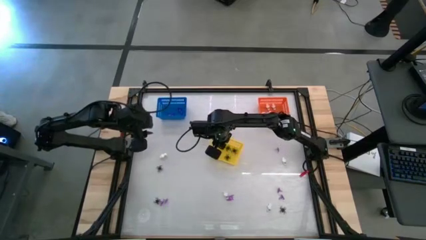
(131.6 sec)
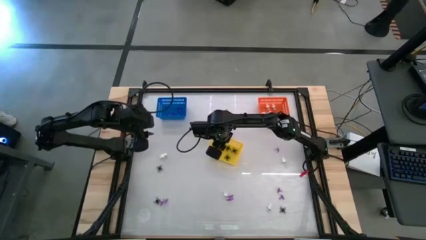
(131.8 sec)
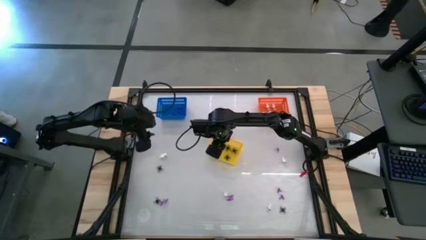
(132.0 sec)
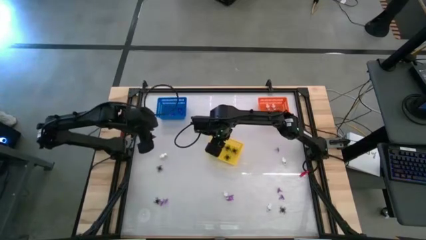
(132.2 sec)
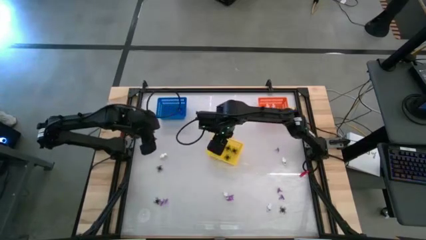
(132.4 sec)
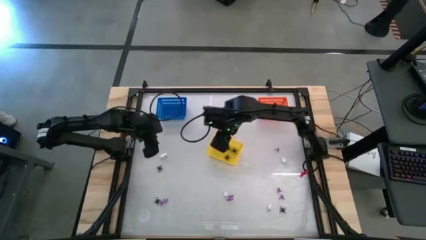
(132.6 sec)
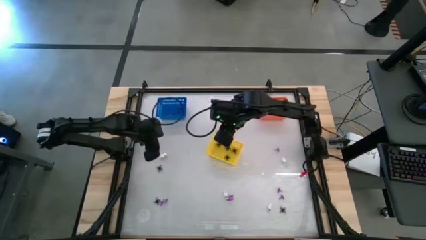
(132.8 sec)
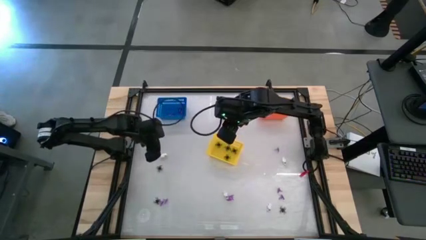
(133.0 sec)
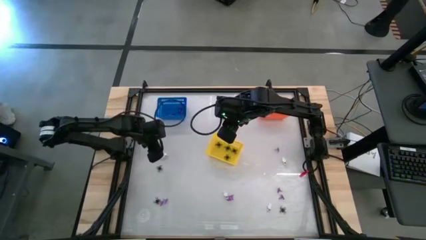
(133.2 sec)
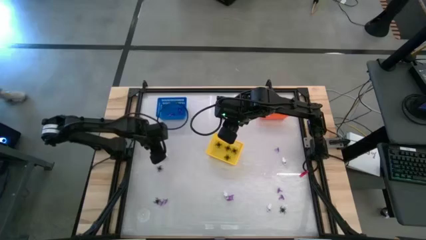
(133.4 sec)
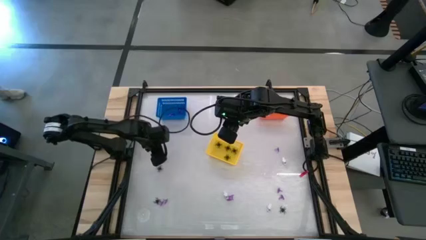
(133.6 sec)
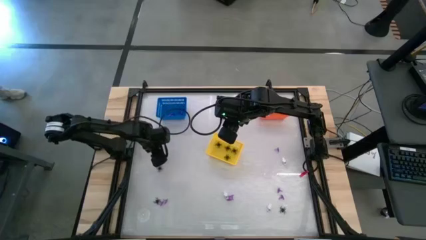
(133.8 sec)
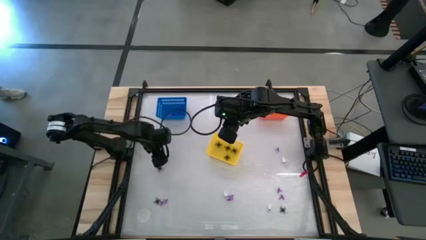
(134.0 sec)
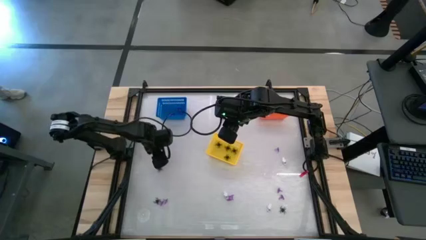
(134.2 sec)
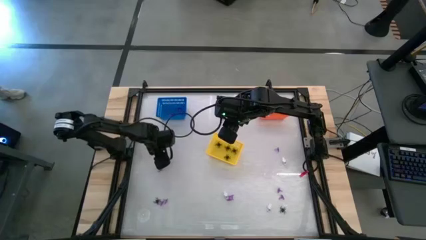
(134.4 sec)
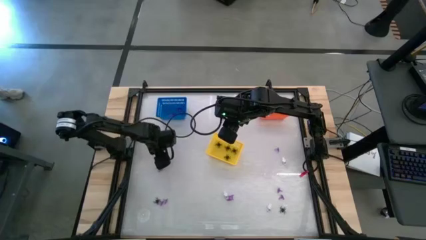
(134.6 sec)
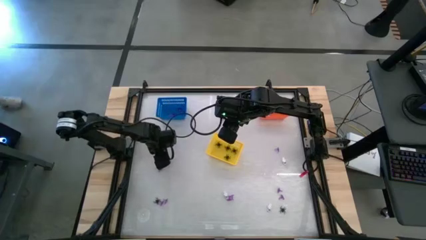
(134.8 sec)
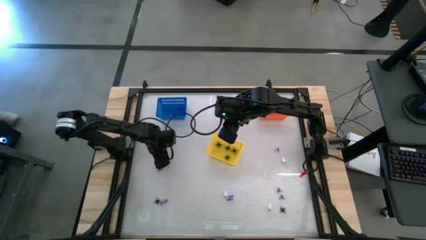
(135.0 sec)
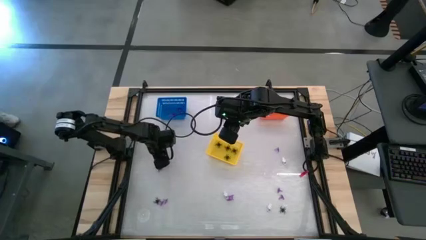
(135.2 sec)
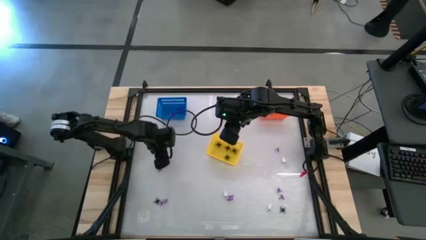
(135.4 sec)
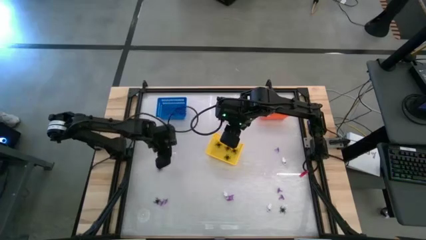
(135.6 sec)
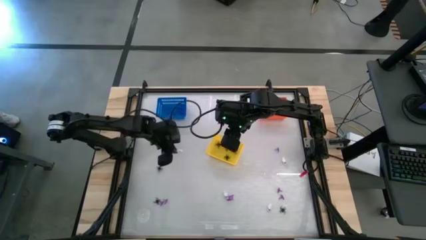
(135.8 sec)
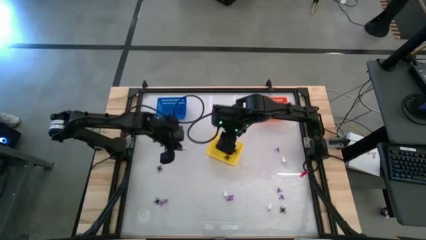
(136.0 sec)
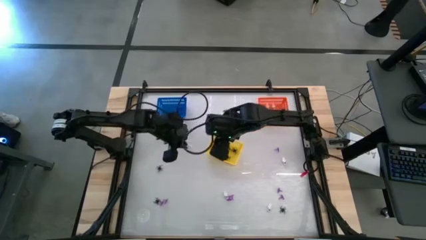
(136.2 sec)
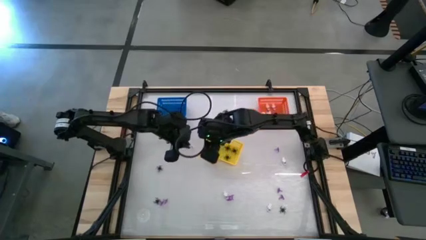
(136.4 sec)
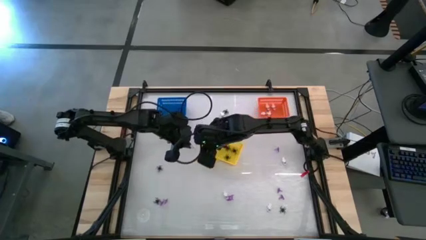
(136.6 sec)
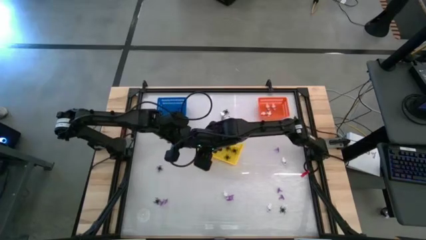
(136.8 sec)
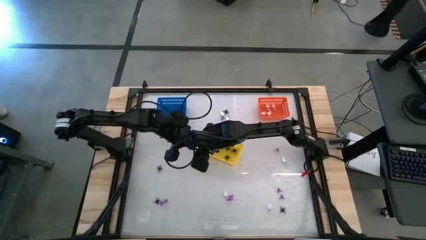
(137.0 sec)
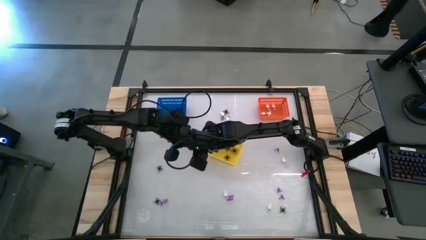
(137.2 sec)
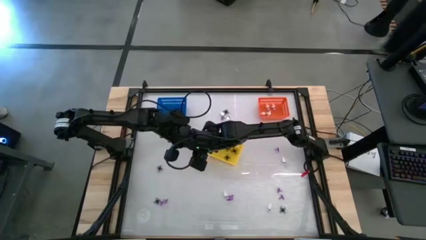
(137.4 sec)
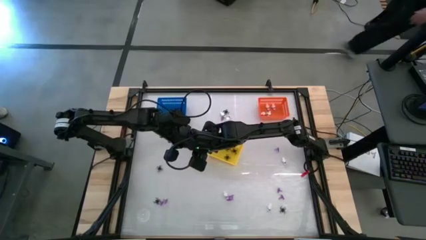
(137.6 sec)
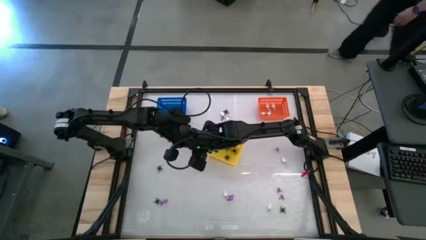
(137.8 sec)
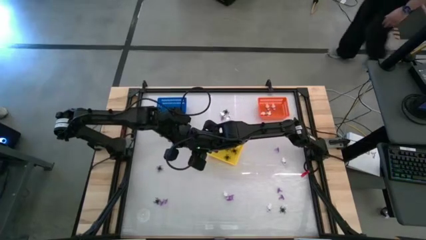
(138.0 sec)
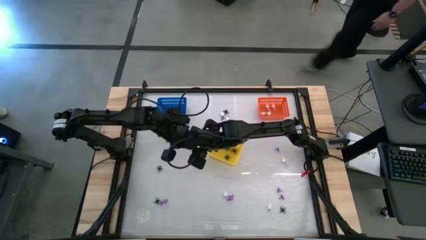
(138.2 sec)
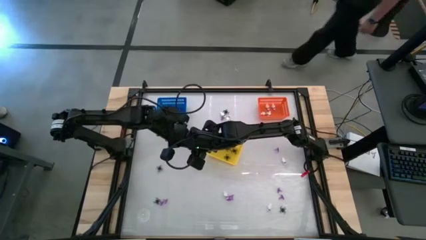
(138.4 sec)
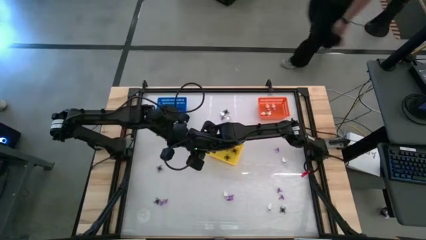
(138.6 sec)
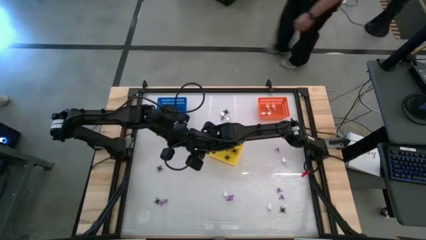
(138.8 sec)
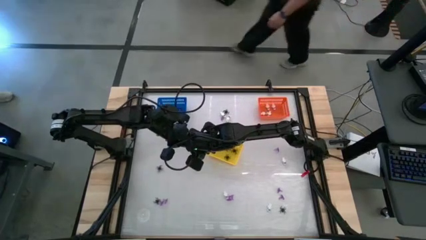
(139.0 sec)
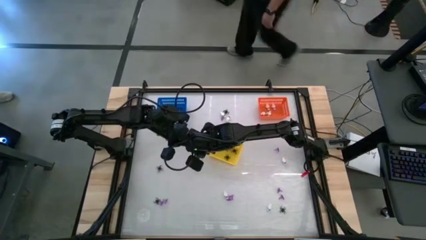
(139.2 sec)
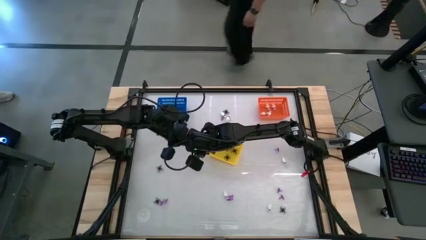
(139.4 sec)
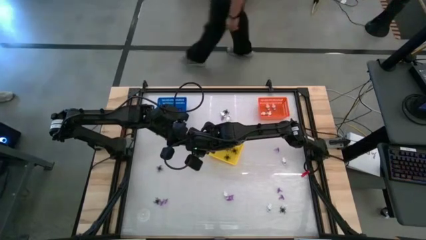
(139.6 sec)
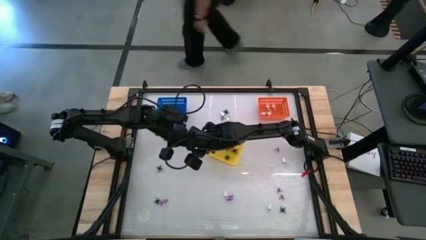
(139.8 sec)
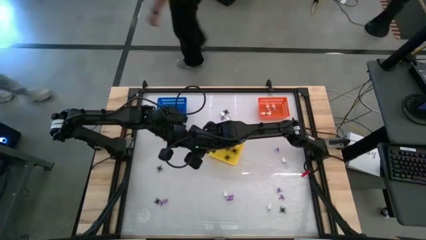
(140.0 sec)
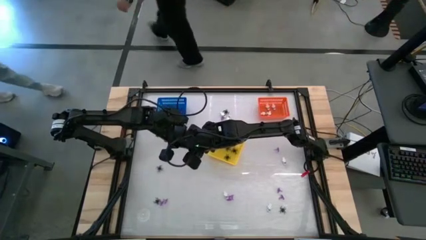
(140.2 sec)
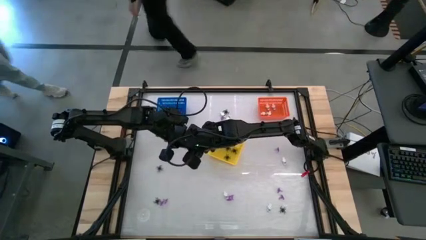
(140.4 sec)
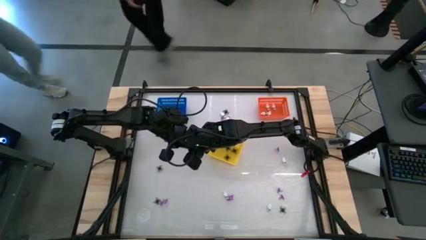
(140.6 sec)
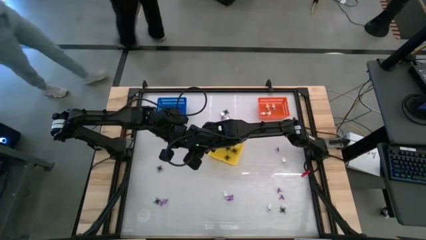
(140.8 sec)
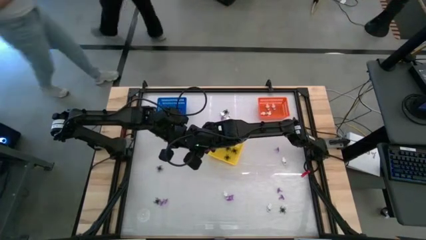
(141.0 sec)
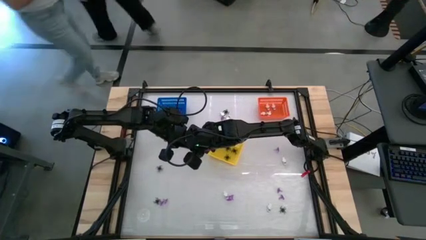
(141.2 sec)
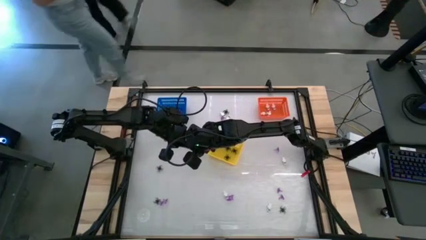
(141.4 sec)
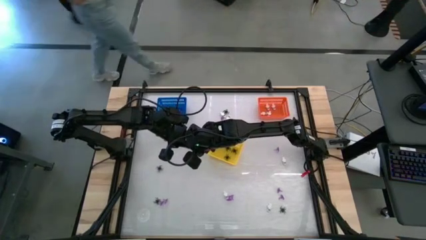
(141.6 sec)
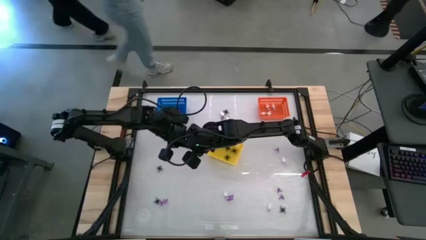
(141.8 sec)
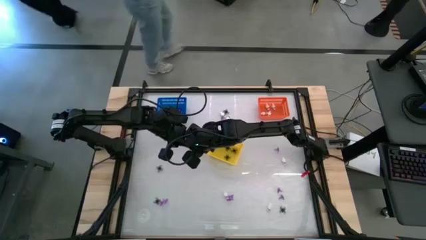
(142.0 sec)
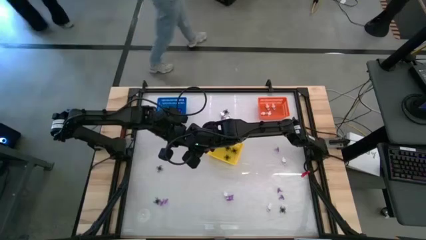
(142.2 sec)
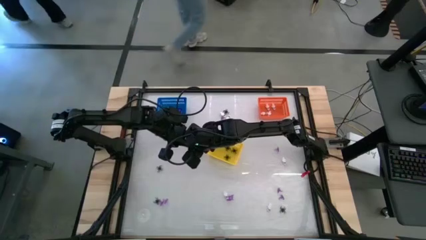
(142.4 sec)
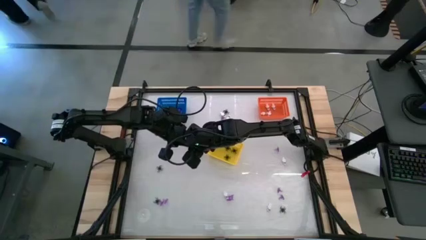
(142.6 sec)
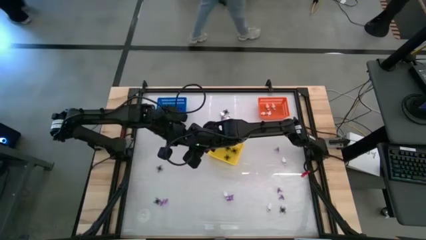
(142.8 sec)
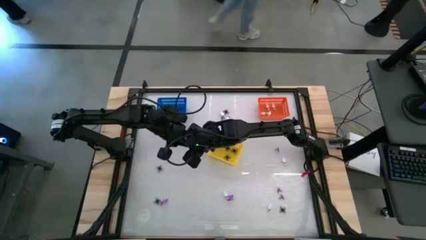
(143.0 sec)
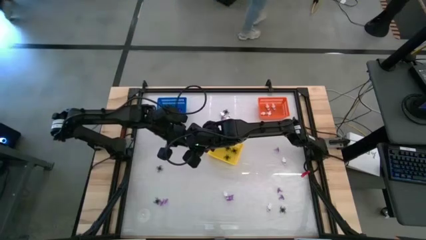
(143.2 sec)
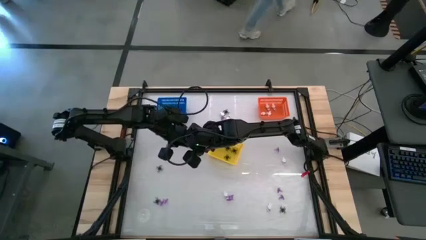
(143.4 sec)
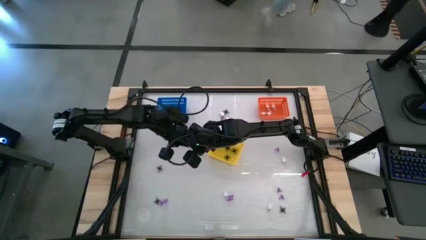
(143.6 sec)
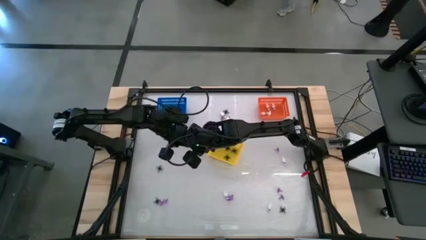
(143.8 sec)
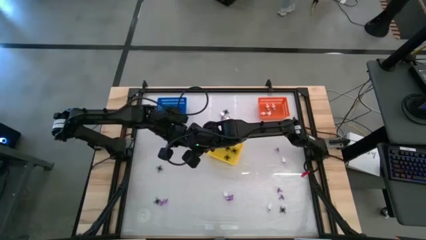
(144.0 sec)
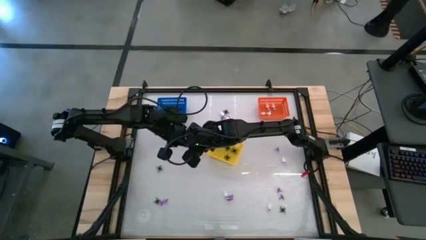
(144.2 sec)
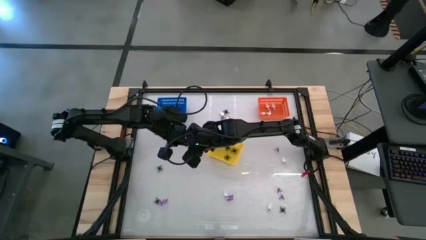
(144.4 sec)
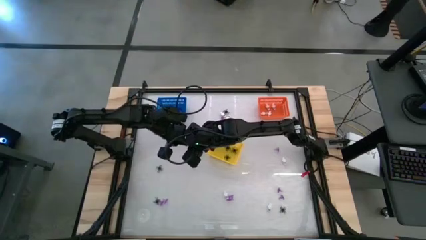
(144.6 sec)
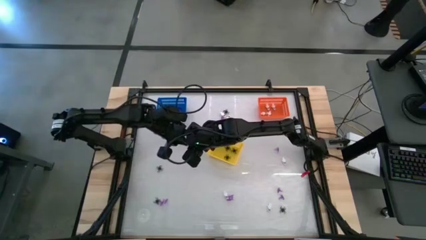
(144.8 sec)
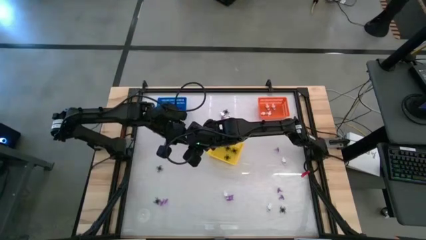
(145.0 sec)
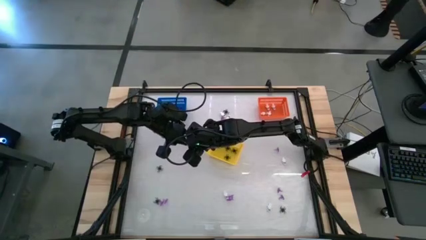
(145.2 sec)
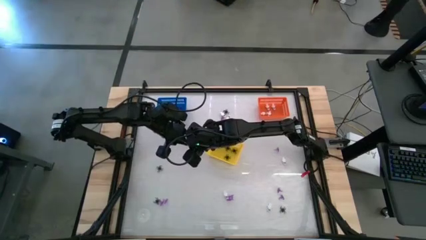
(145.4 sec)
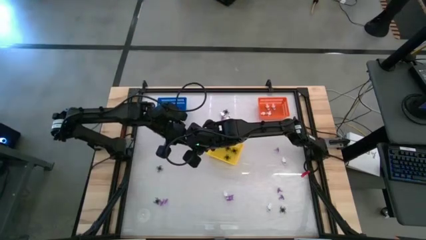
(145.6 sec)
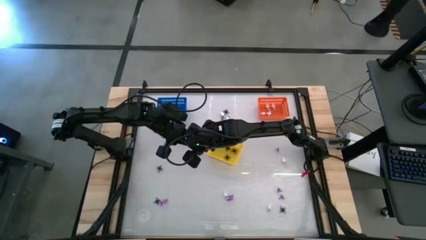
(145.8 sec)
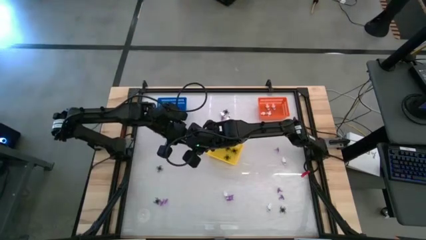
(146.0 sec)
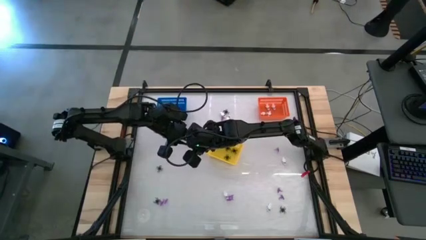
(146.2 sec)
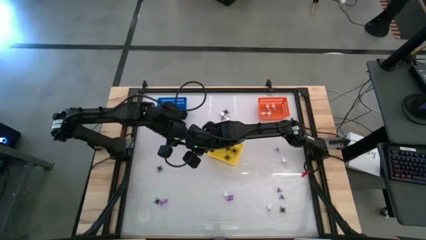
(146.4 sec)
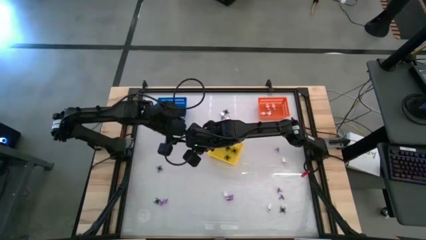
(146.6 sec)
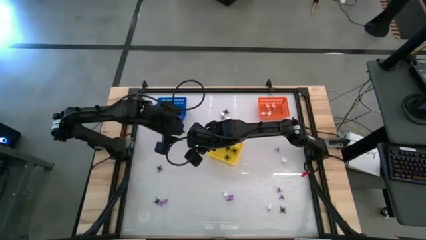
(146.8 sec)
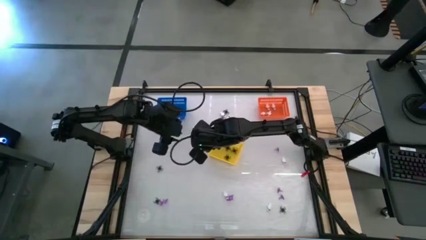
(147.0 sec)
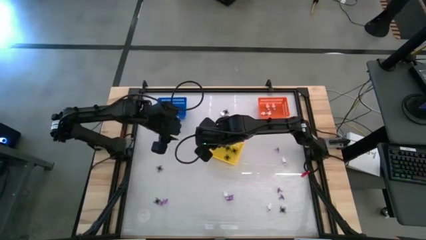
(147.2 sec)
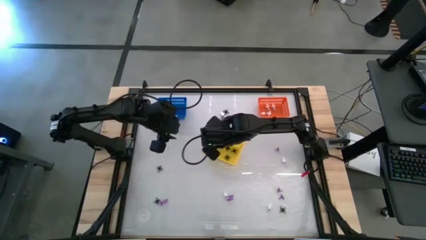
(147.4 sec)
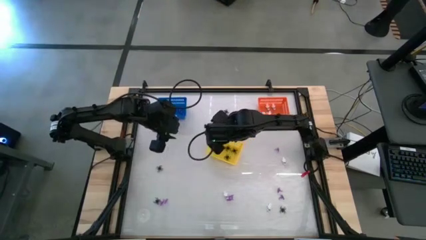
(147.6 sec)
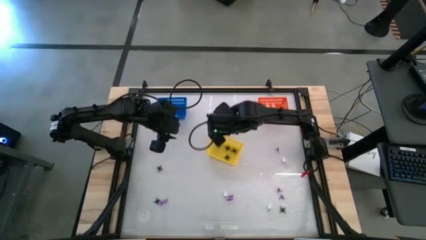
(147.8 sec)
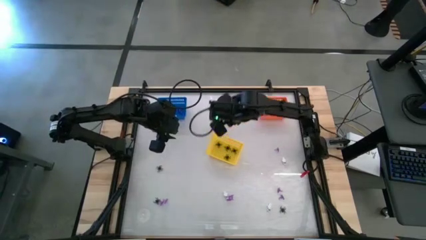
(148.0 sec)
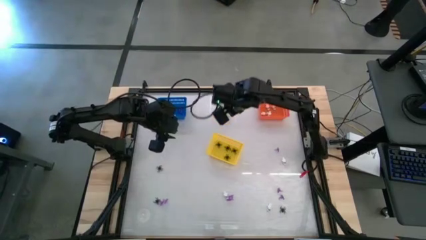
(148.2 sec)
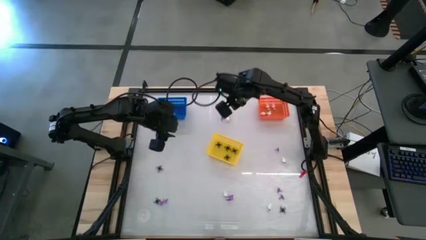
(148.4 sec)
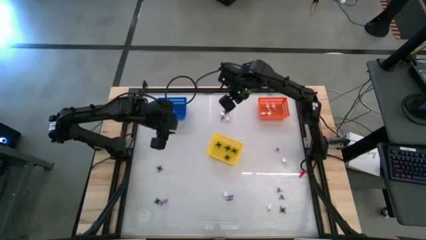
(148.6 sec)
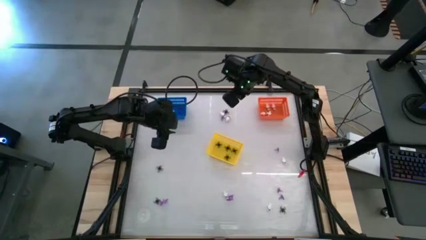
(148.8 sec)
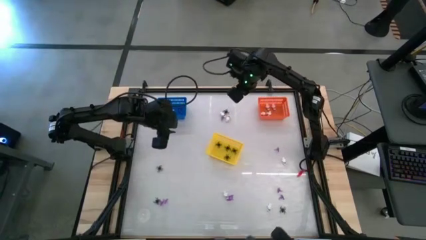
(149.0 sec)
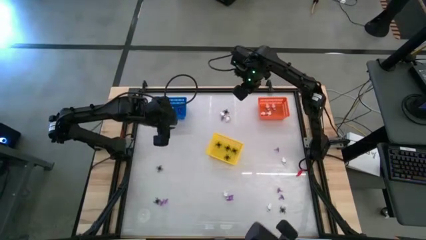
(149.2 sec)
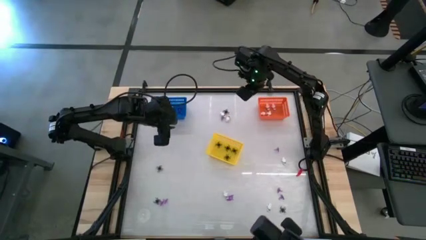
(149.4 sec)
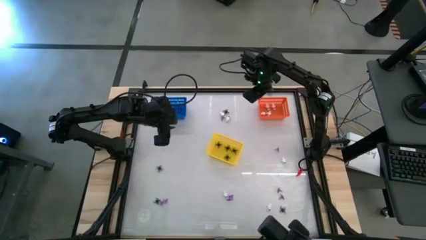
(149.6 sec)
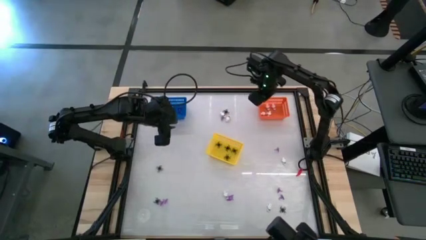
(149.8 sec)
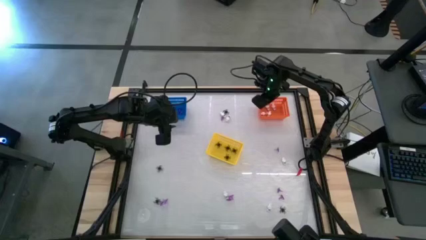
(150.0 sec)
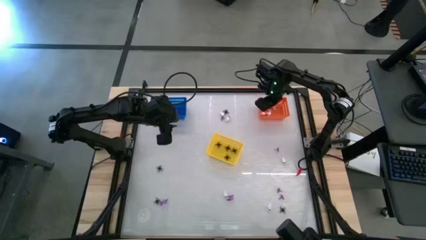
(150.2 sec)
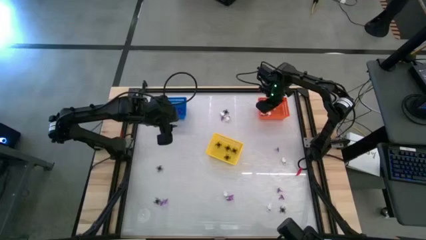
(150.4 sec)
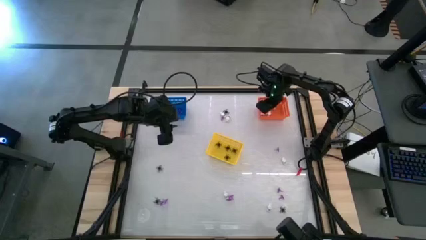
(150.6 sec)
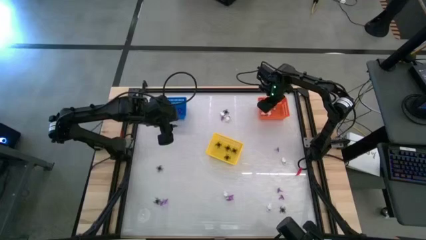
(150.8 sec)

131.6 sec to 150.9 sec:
Task: Sort Halloween decoration
Put the white skeleton toy into the orange bin
